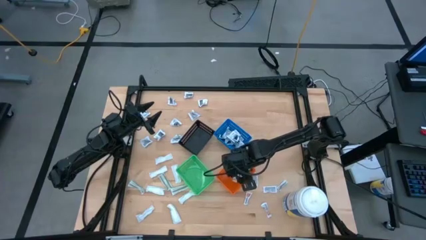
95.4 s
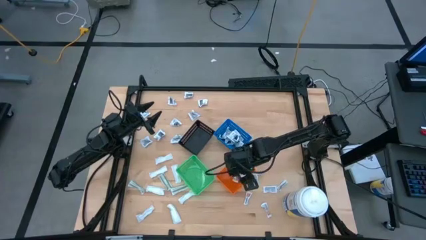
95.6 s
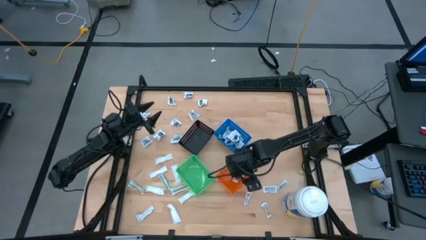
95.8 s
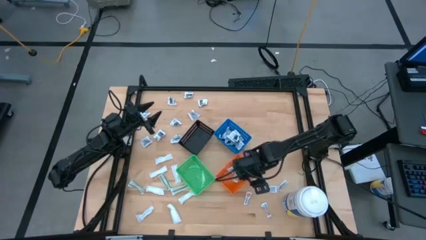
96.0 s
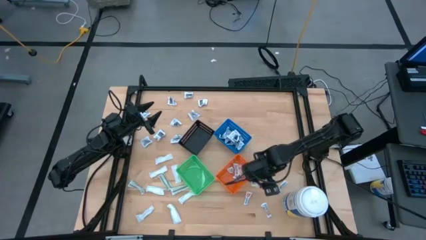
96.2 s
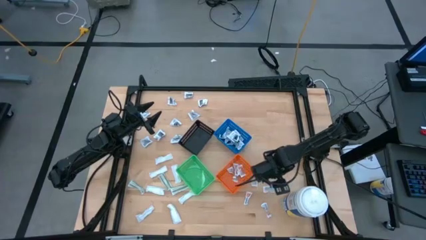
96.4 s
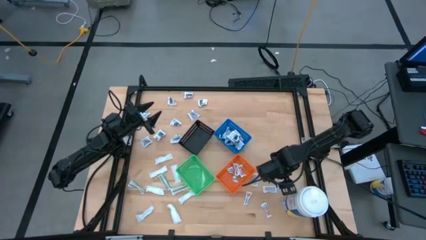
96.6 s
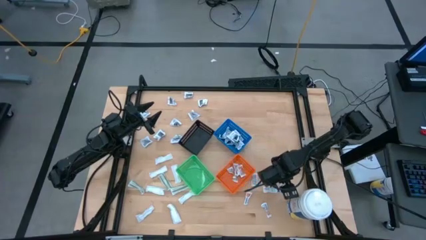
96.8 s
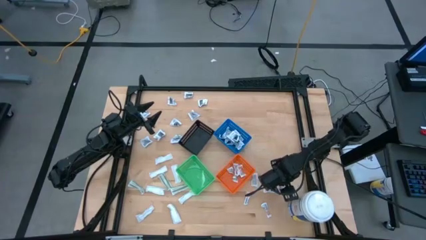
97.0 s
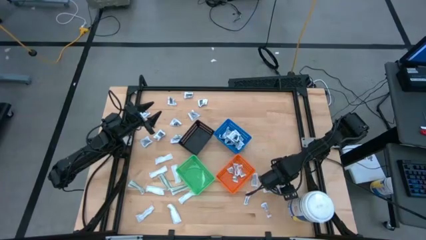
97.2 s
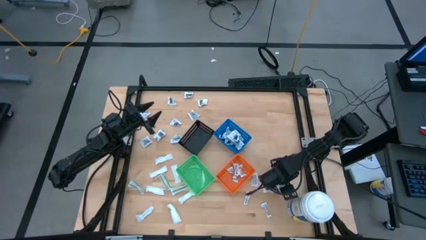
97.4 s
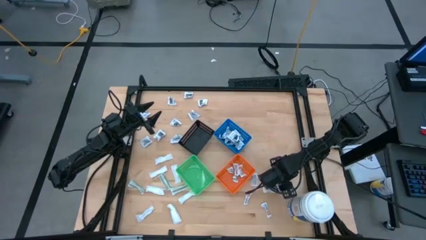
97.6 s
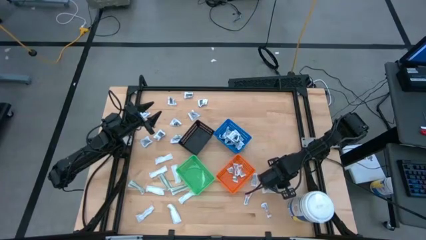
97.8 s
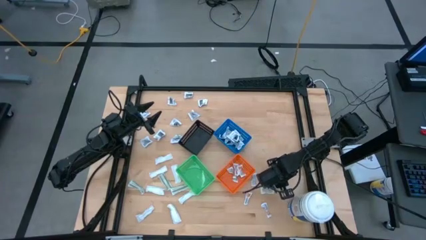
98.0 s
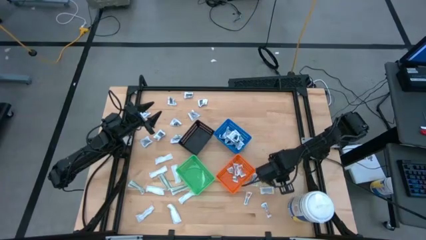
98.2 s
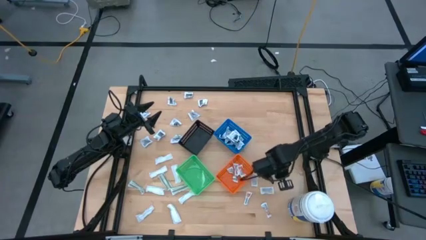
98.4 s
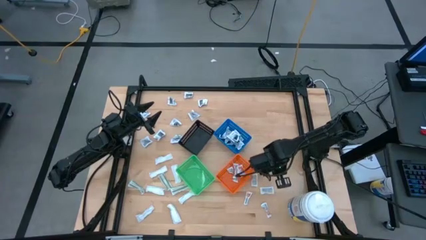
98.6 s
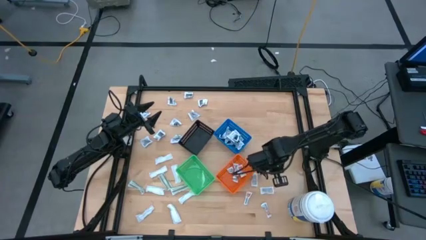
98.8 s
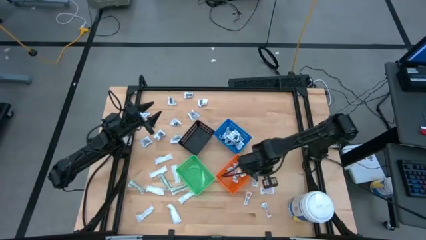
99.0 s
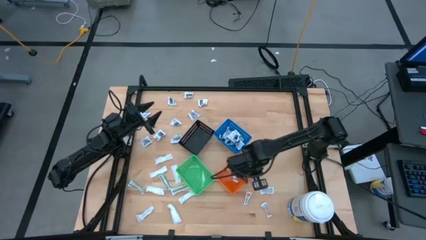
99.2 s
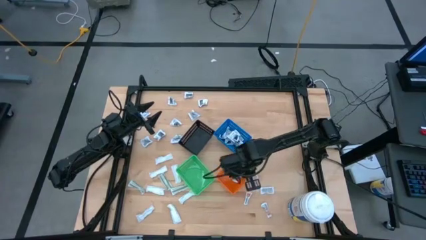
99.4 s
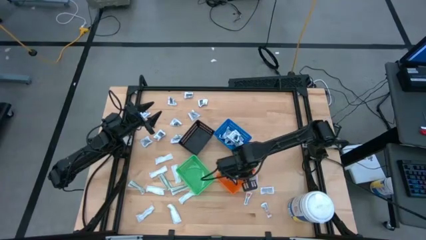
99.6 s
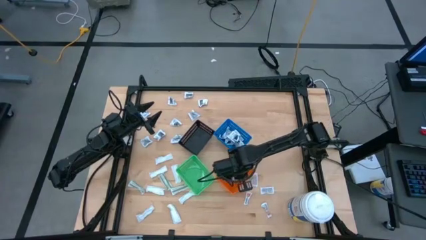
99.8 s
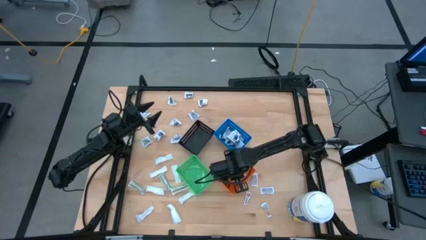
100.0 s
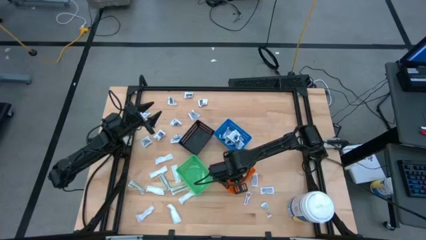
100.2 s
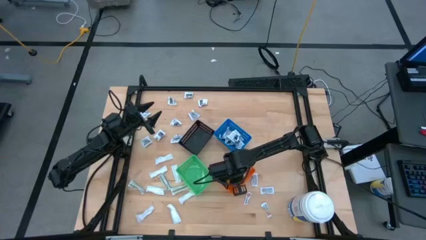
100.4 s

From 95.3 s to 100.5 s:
Task: Pick & Place First Aid Supplies
Put the orange ointment pack into the orange bin

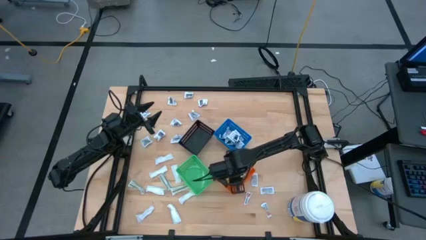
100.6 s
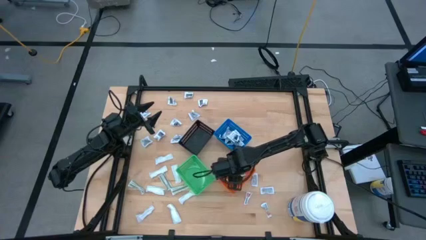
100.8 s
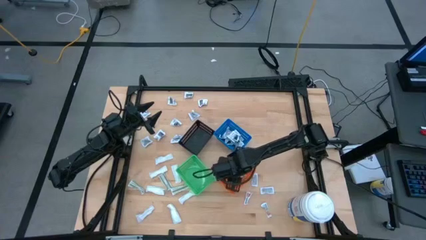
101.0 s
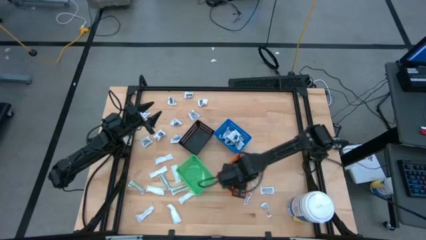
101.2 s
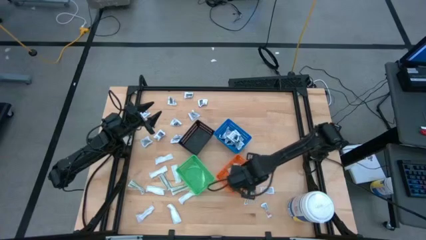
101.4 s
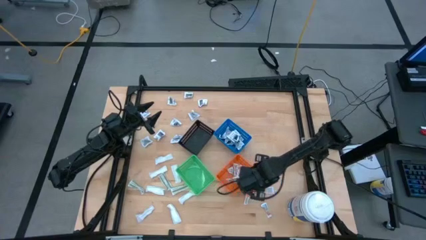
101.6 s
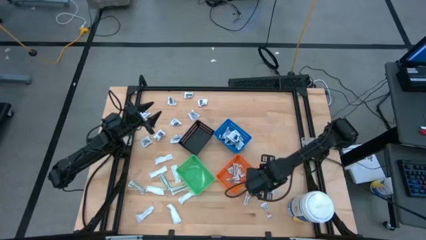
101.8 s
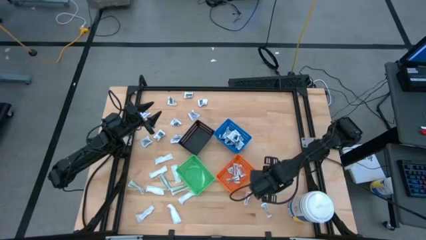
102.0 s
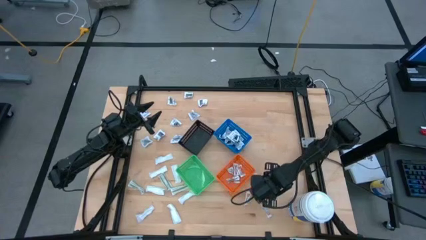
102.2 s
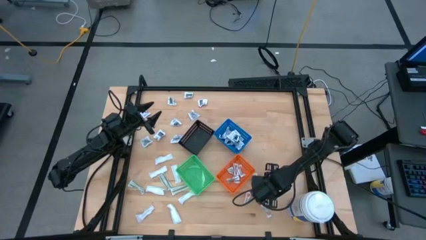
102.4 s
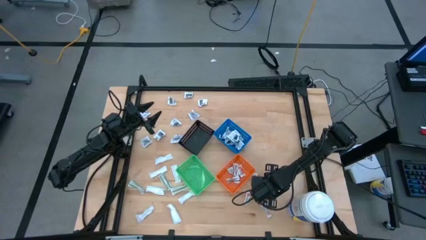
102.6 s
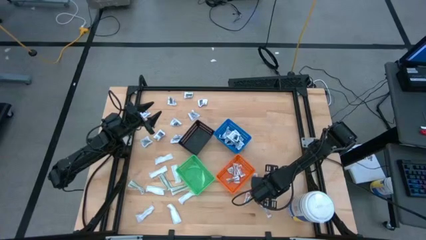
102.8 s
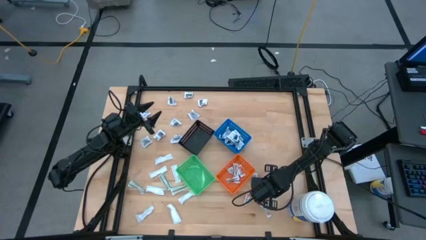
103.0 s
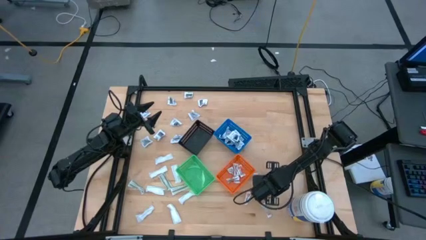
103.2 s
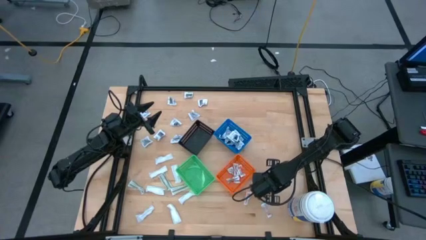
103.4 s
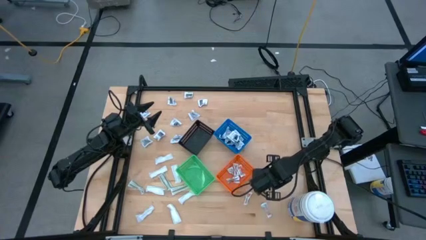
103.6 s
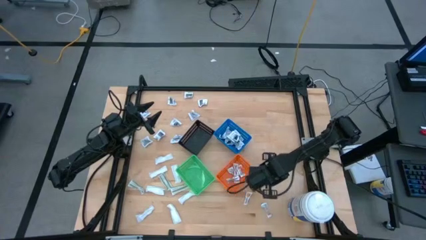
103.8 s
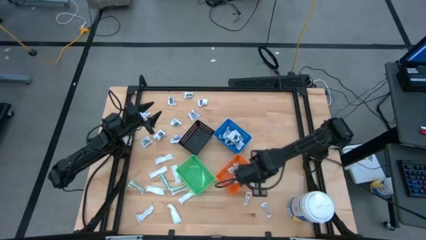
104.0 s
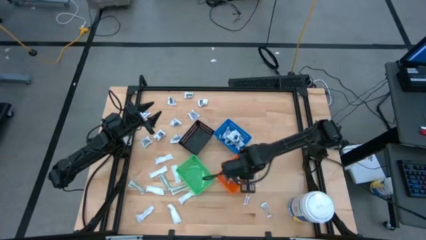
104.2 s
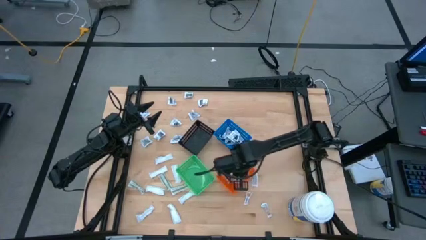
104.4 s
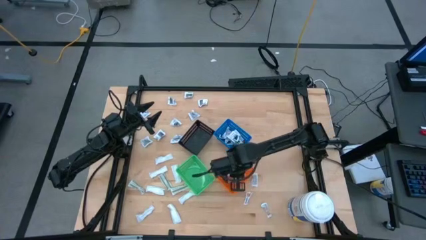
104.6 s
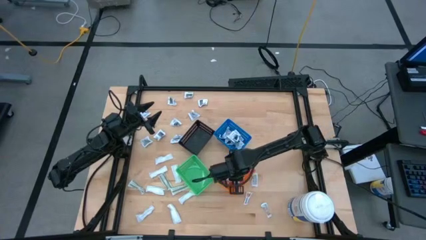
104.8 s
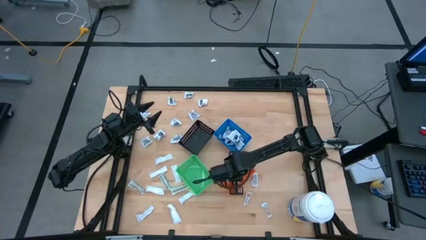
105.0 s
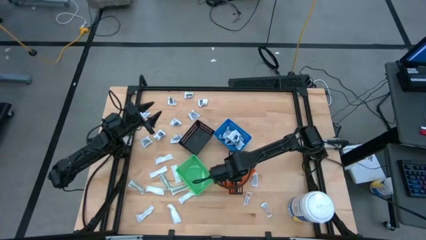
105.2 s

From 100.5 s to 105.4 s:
Put the orange ointment pack into the orange bin

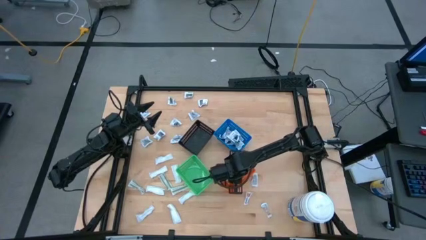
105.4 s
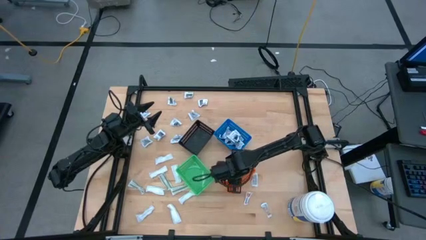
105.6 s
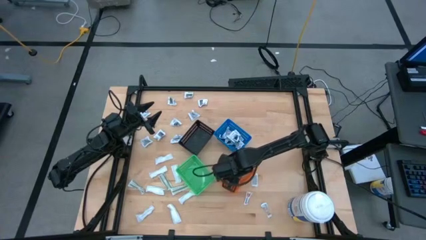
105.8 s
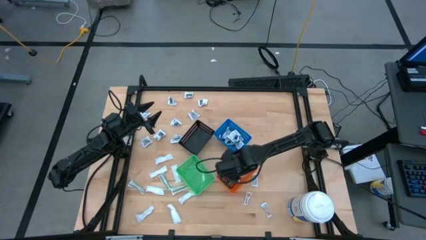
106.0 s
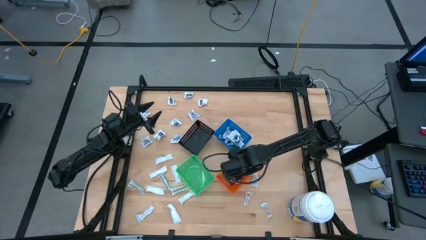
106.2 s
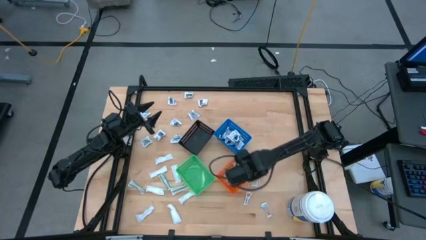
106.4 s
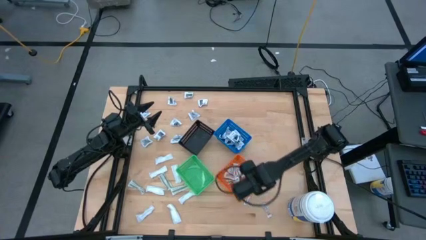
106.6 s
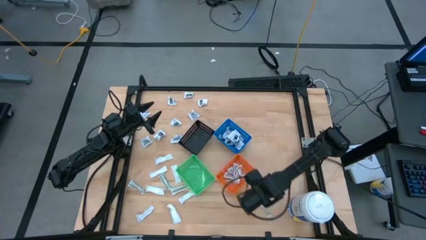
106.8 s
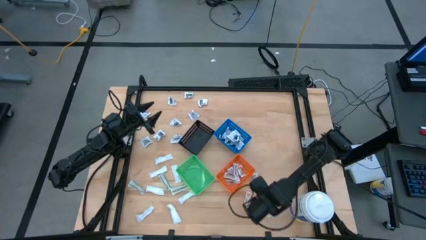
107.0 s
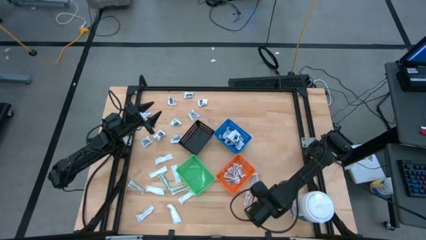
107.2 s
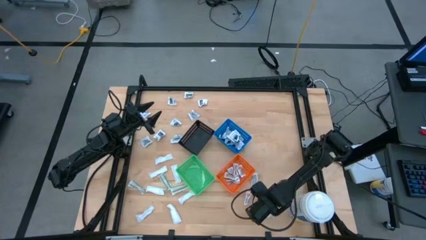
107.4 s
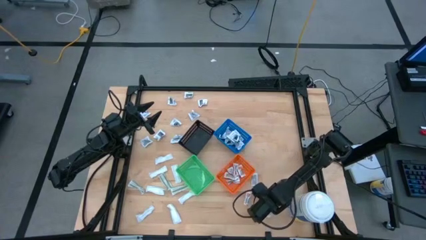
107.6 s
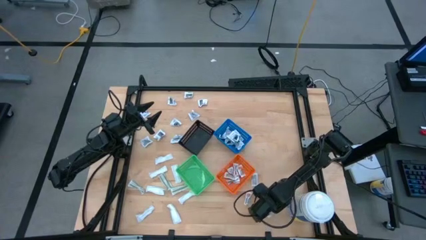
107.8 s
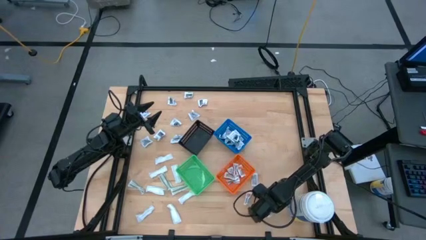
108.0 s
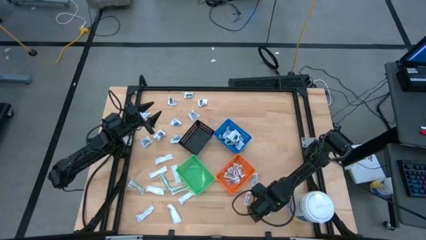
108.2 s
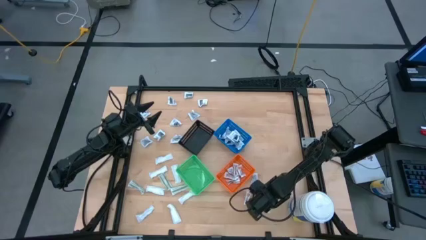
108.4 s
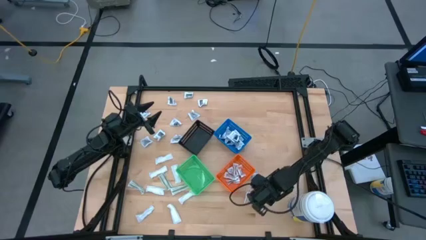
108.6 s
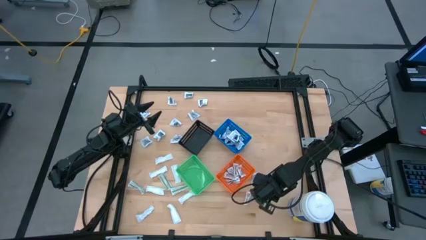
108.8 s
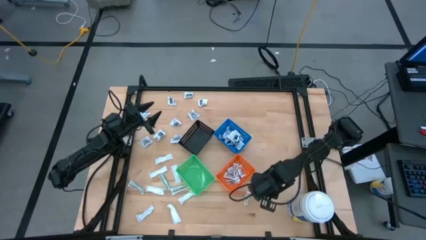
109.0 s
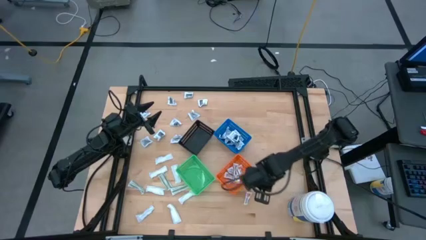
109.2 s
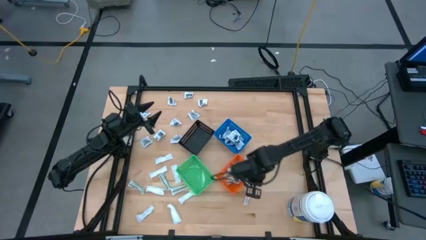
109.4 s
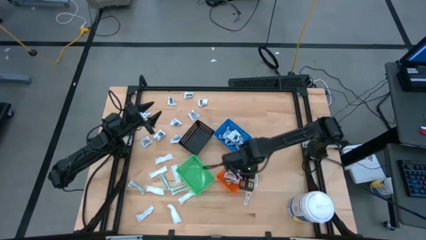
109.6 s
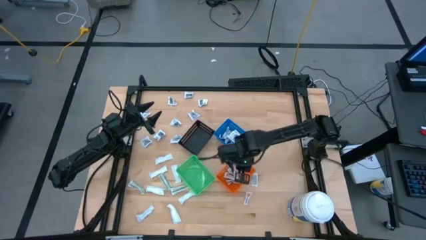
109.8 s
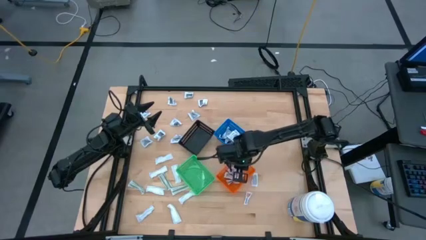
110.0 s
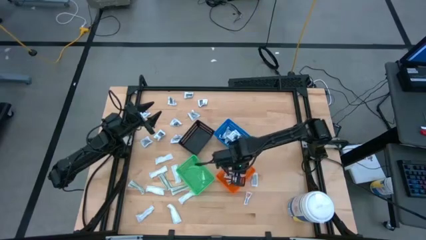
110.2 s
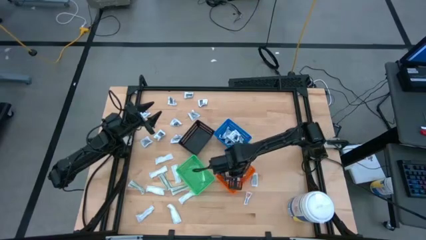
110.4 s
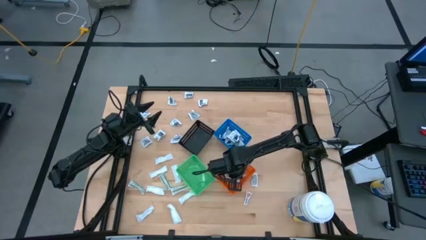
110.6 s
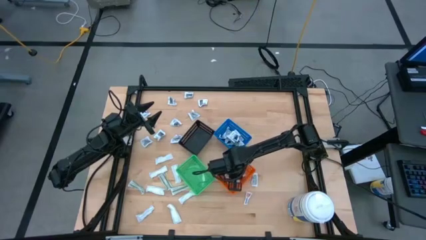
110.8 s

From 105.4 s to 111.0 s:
Put the orange ointment pack into the orange bin

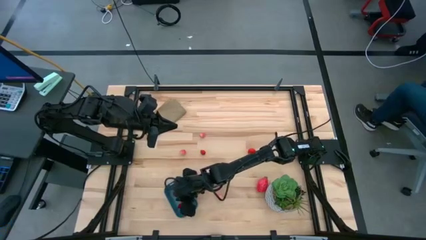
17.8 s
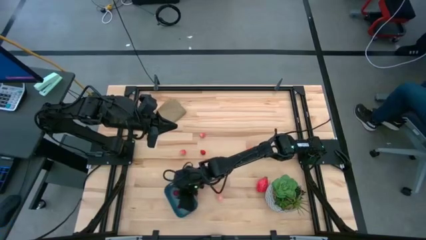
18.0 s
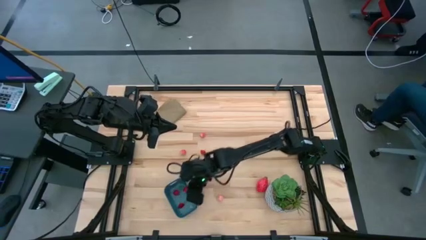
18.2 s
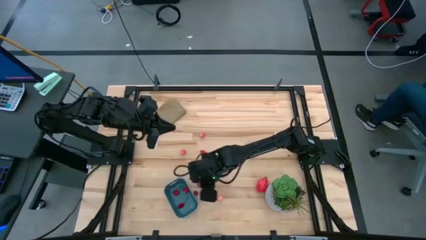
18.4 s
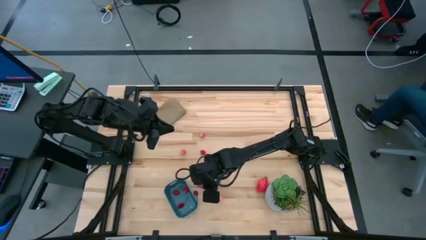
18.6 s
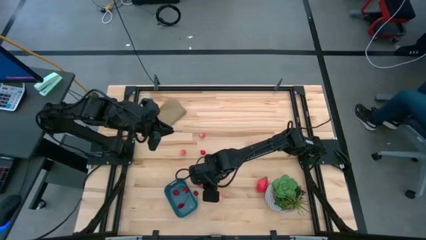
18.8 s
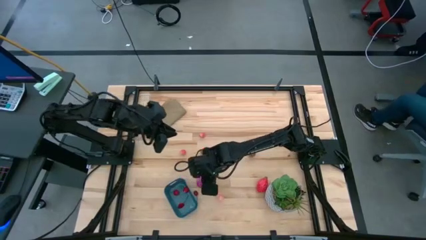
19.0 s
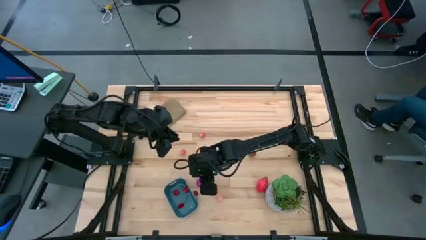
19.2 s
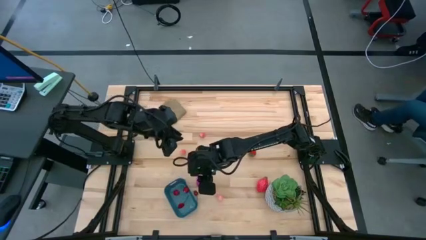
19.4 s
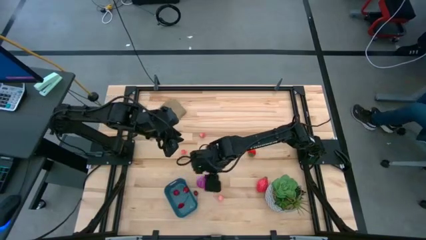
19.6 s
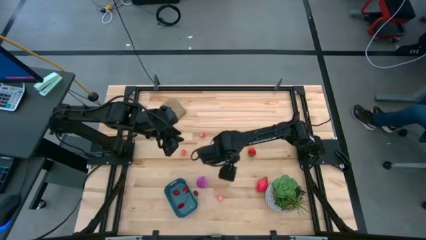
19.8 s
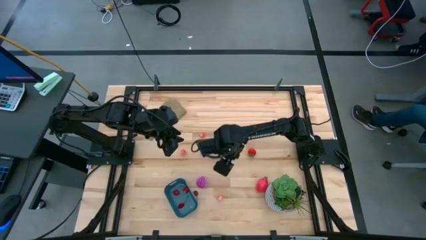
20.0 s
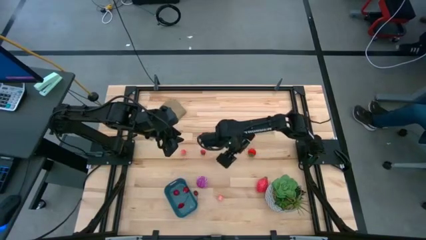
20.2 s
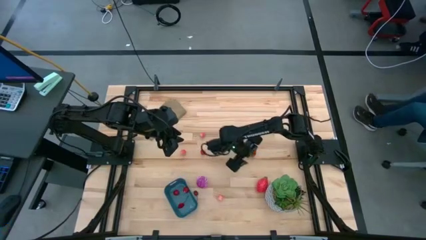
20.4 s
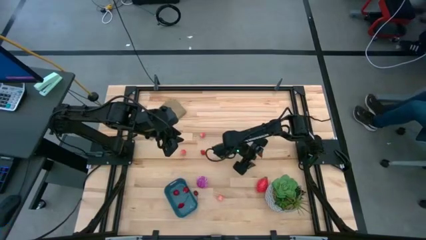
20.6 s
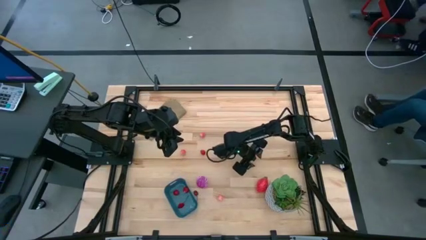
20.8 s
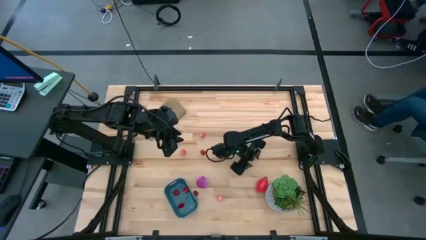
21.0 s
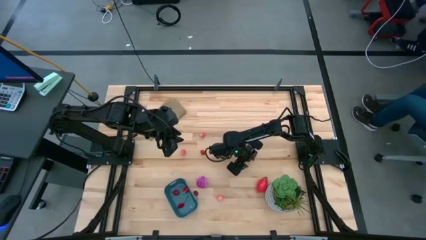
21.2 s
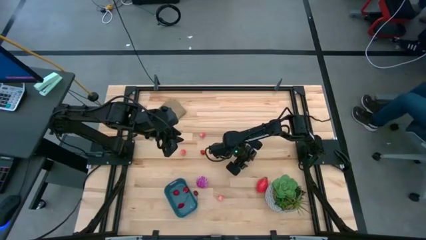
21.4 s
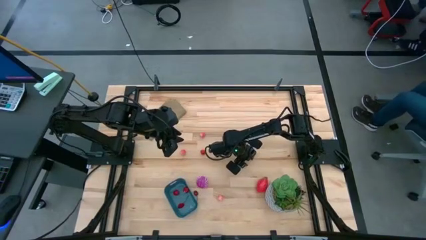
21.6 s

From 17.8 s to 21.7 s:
Task: Pick and placing Produce into tupperware
Put the red strawberry into the blue bin
